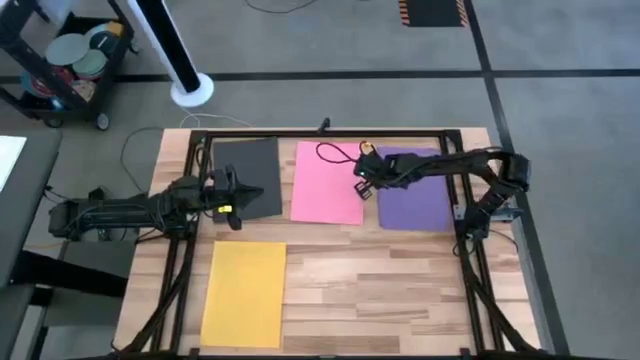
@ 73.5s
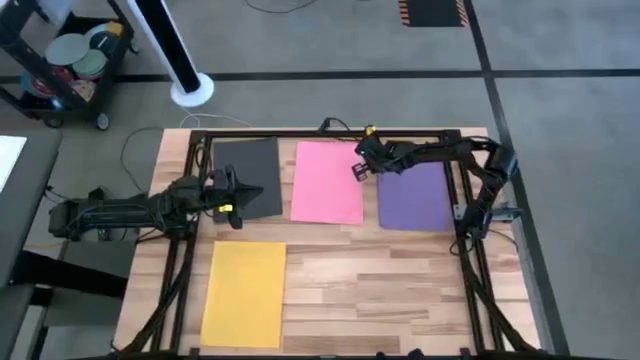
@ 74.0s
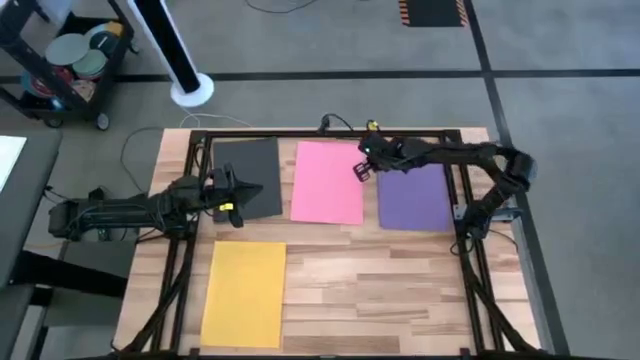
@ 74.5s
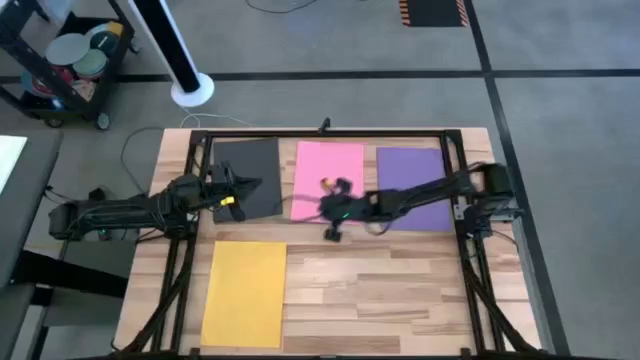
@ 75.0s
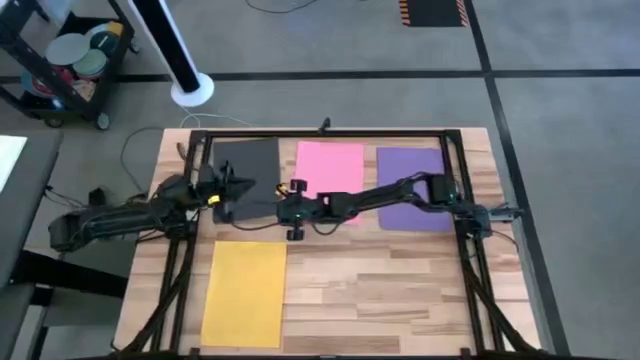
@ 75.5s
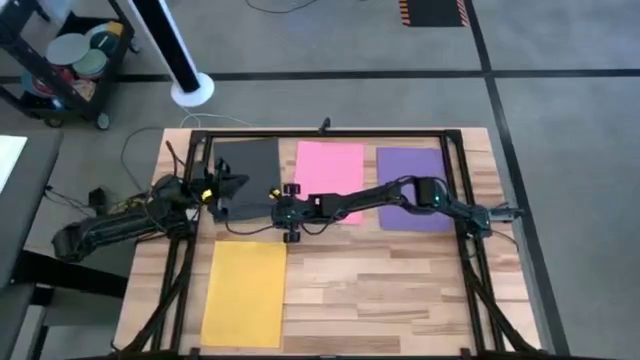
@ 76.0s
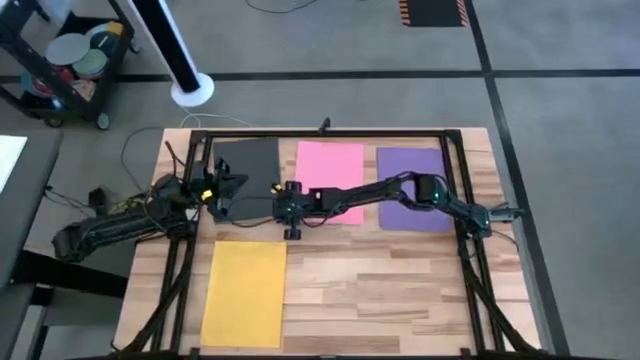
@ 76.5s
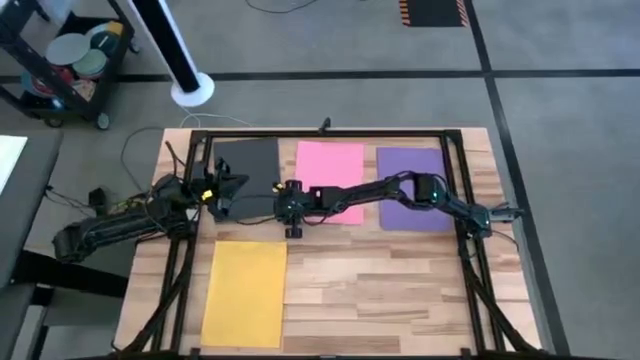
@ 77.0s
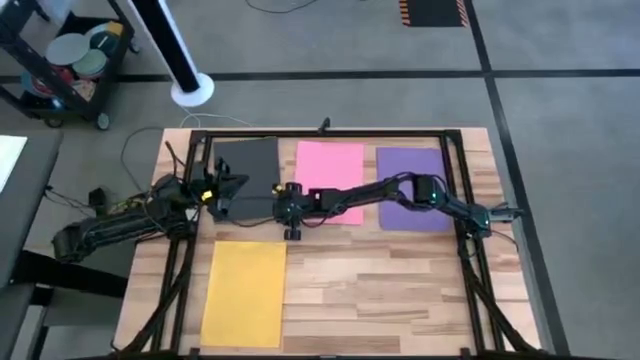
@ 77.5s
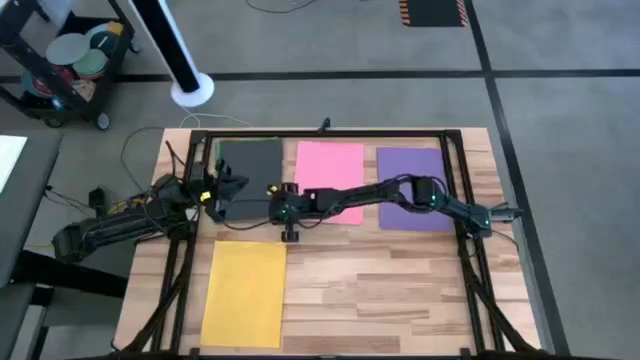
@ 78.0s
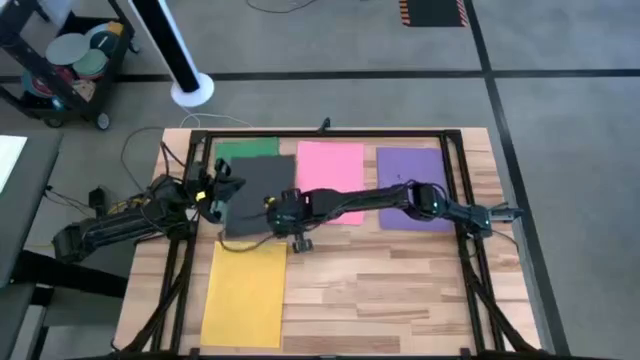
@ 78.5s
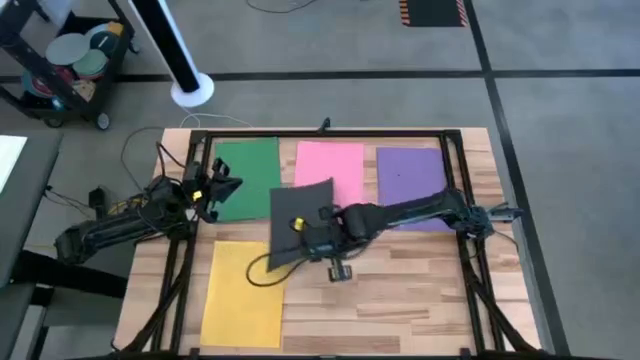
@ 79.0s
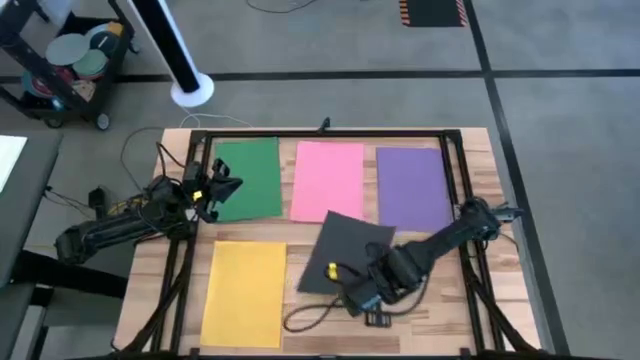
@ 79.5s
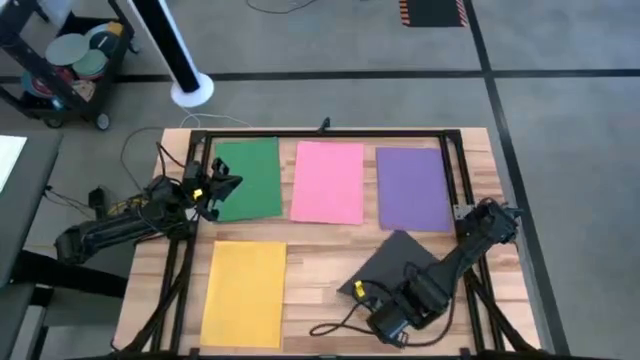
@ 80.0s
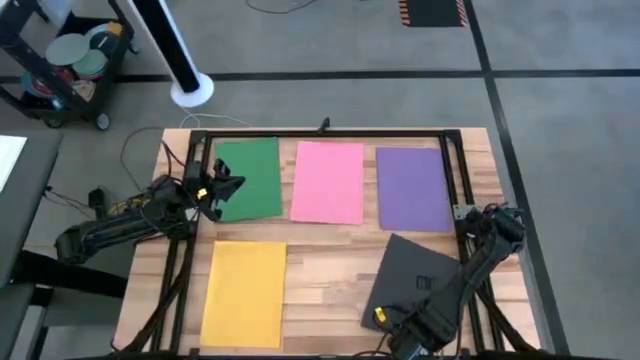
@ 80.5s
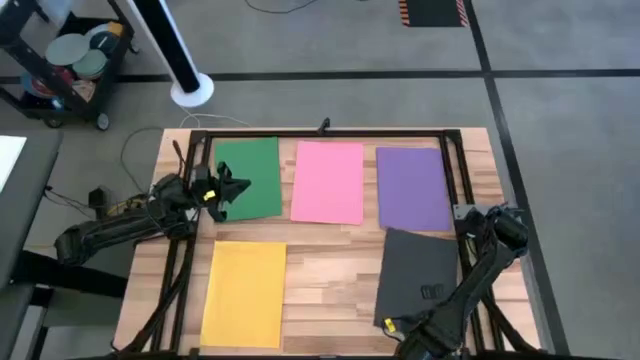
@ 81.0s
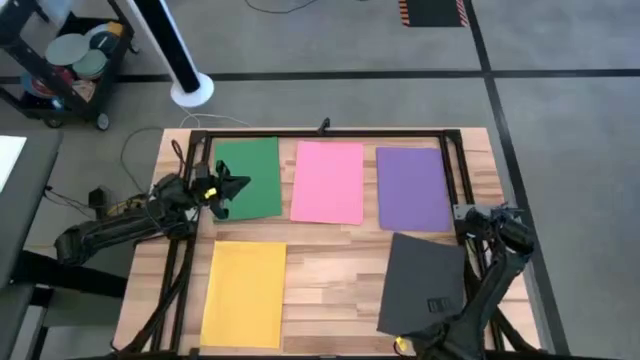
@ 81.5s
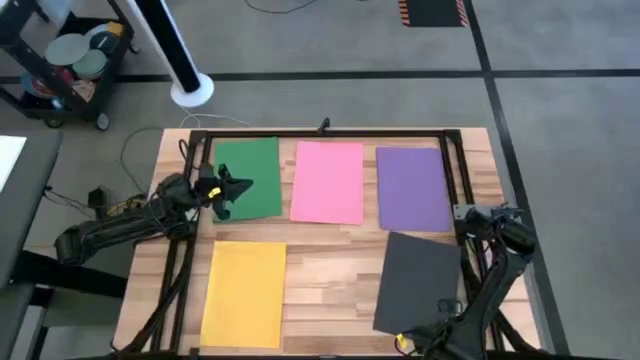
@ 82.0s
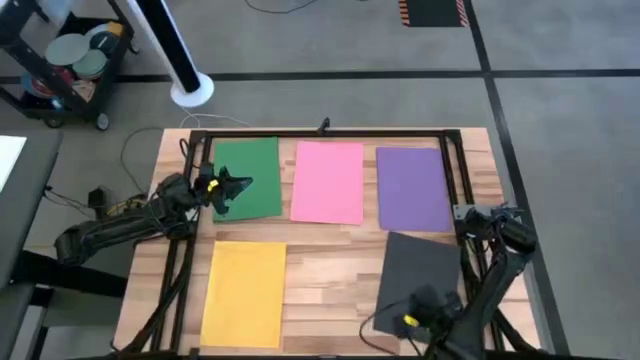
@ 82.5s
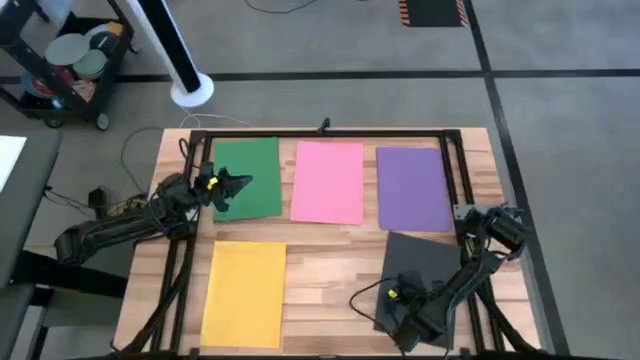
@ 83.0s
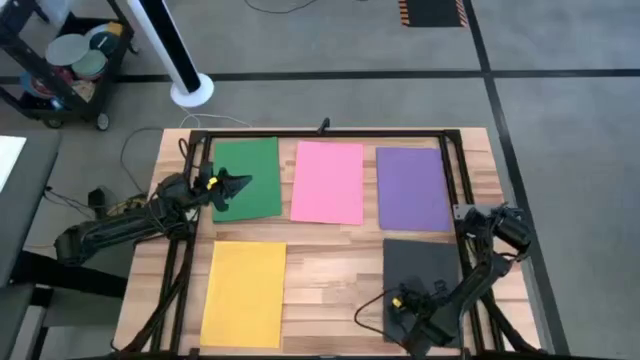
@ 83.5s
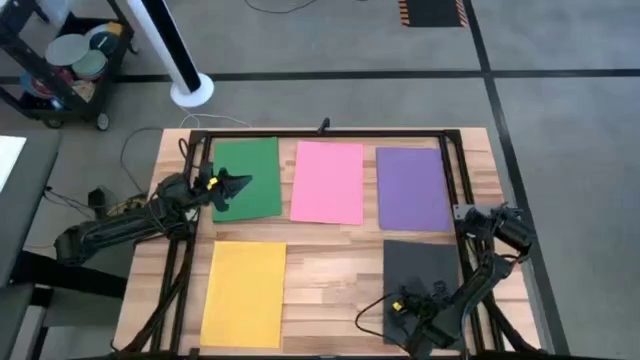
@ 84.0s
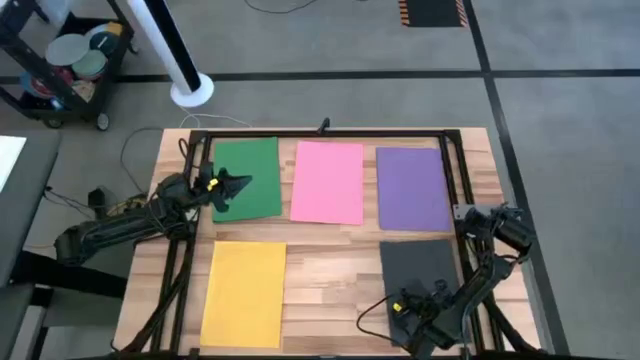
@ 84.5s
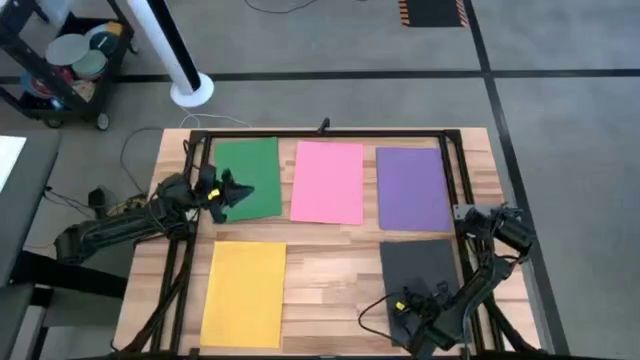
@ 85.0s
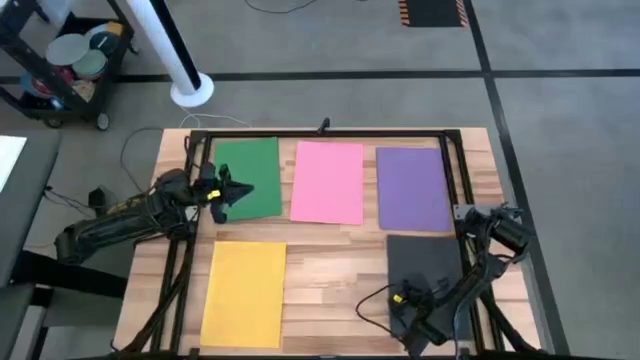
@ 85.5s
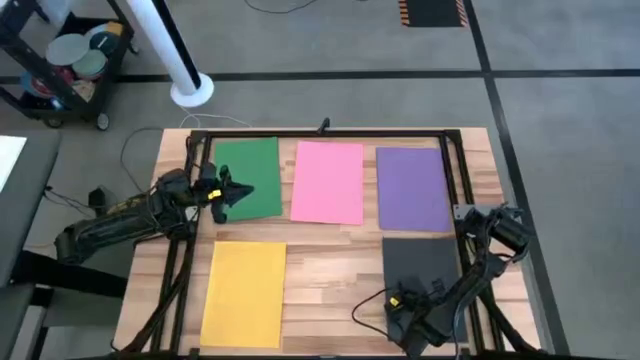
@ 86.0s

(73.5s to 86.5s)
Task: Organize paper
Put the black paper to the bottom right of the table

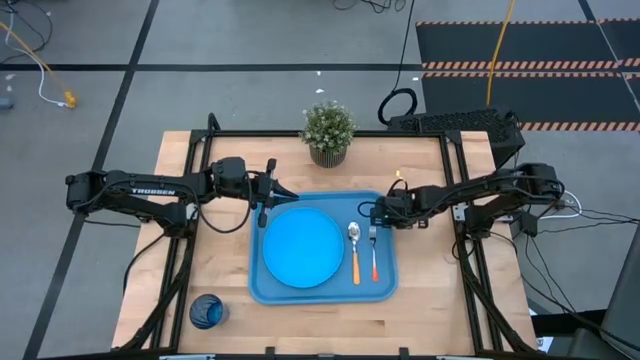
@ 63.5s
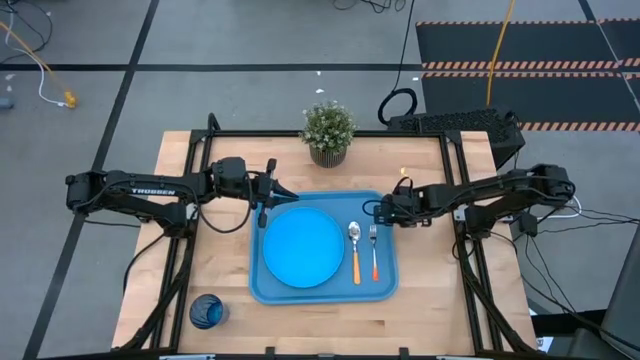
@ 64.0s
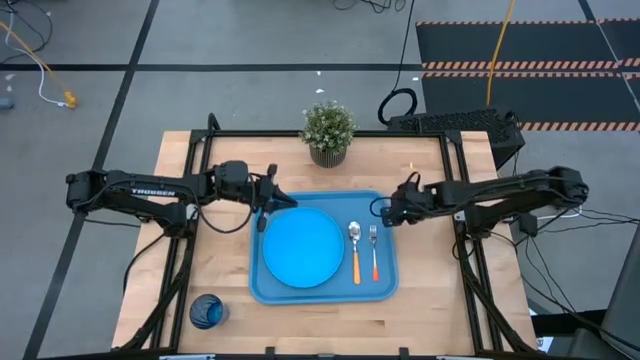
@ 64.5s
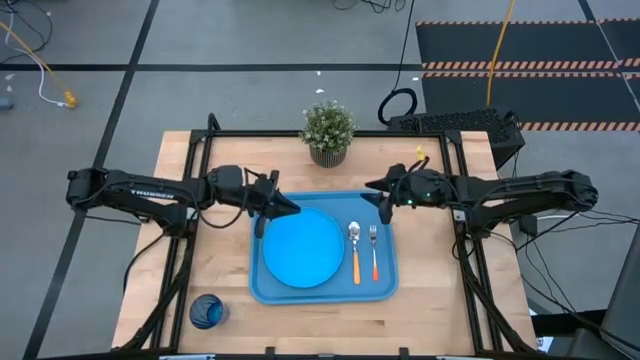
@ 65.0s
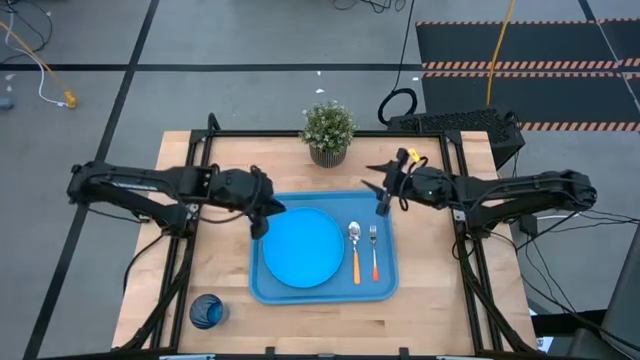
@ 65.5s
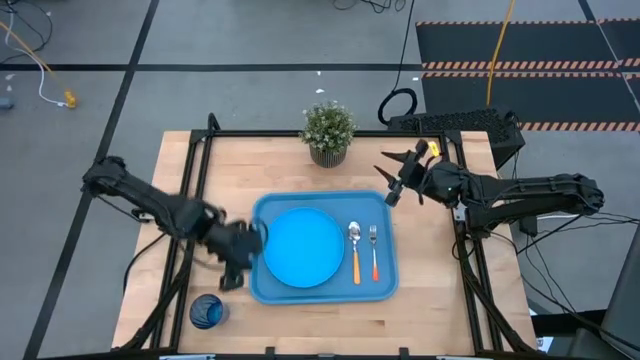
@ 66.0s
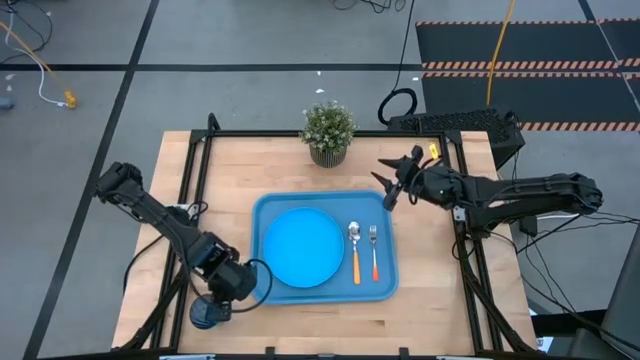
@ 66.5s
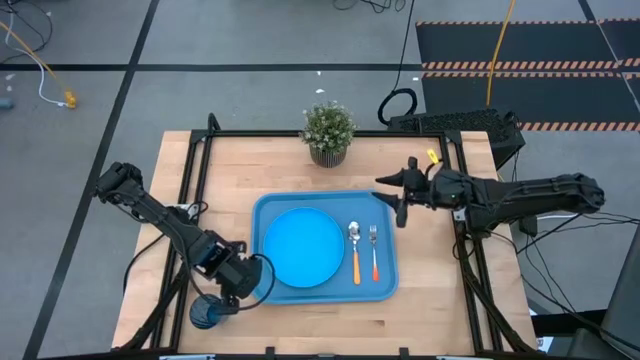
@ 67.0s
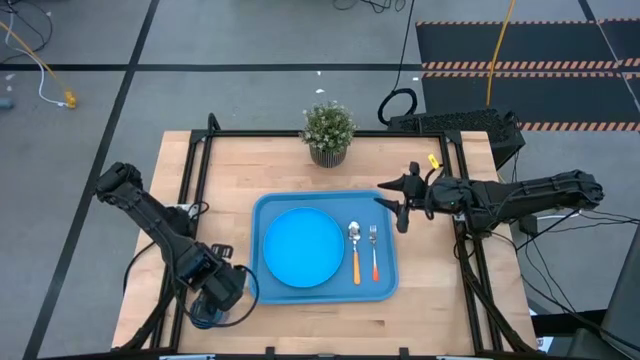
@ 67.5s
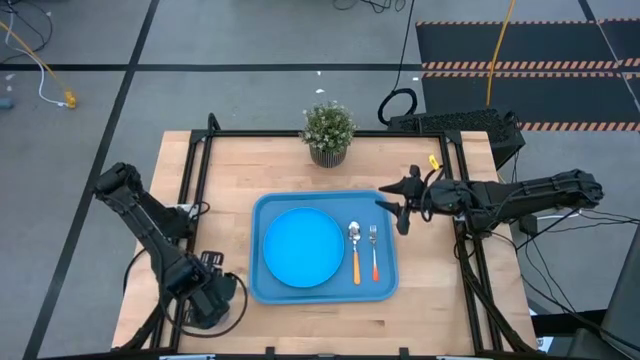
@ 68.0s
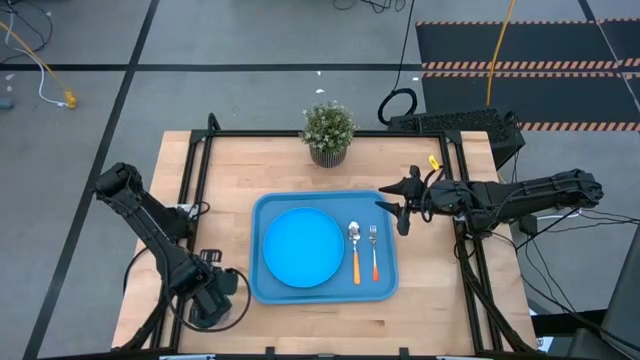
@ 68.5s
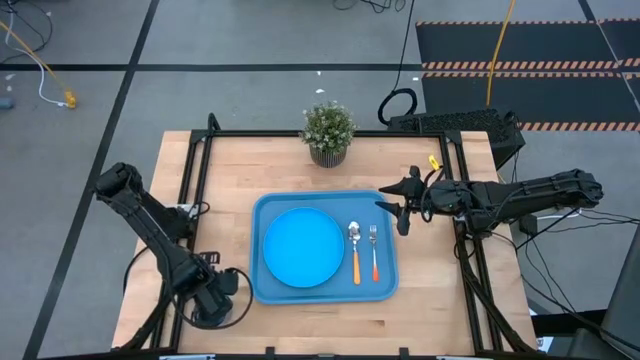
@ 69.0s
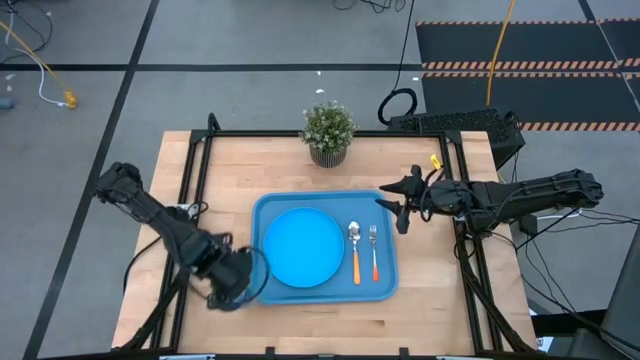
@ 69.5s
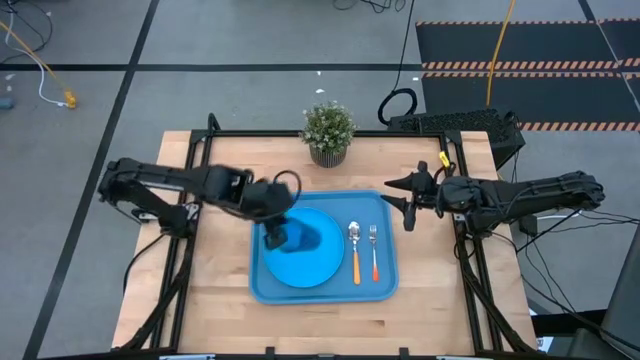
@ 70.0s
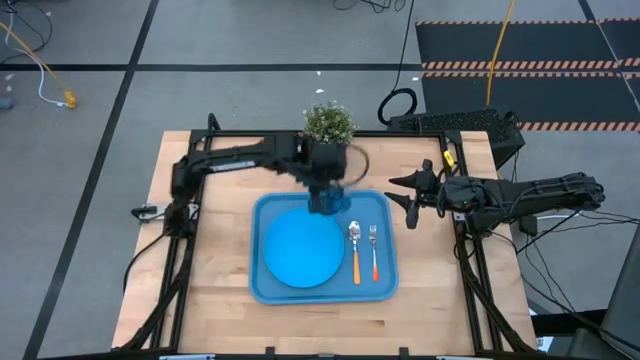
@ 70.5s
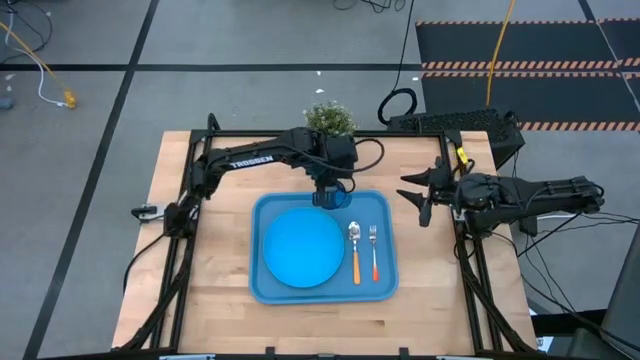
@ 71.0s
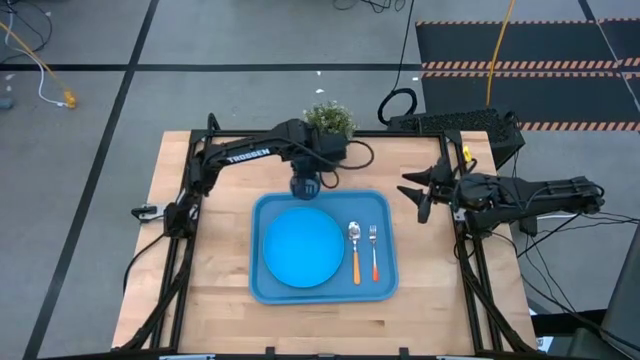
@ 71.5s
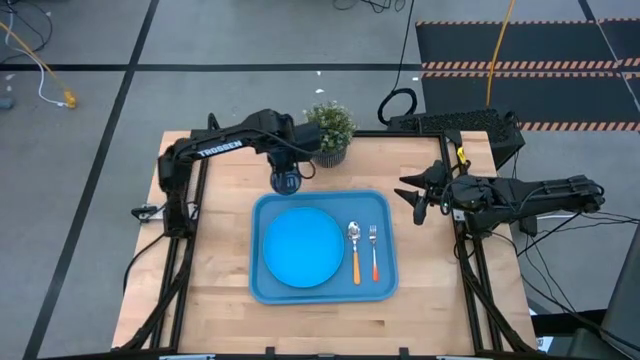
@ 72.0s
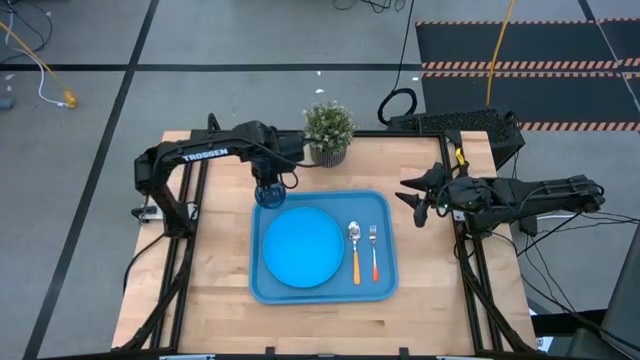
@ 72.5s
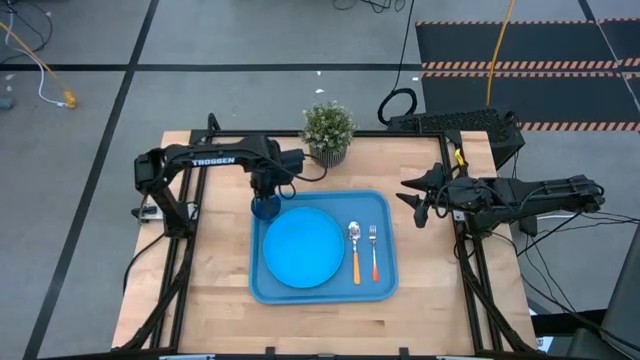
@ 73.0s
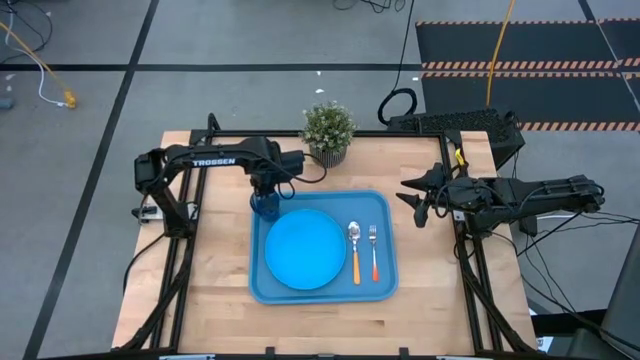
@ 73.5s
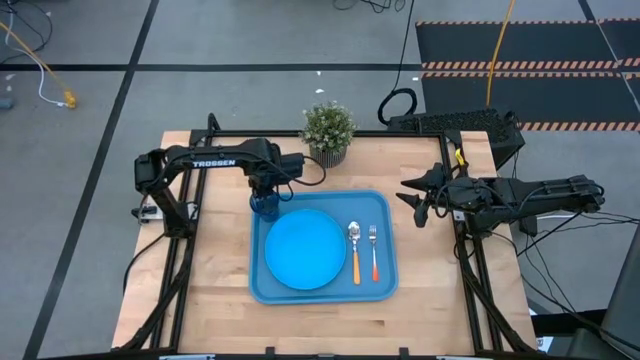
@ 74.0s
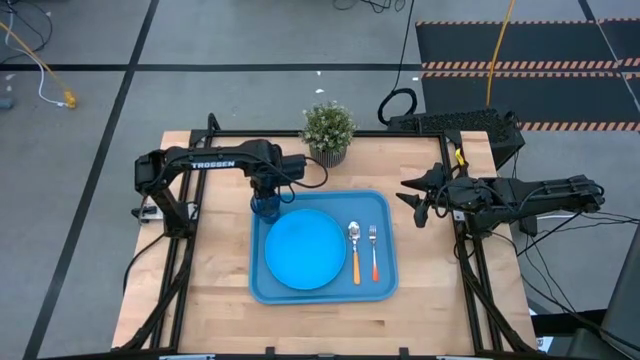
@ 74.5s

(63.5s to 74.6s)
Task: Pick and place plate/cup/fork/spoon on tray
Put the blue cup on the top left of the blue plate on the blue tray
